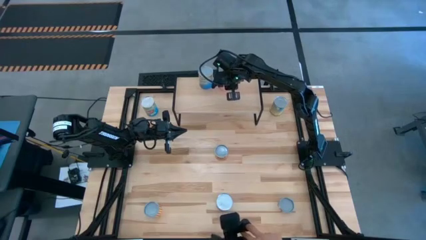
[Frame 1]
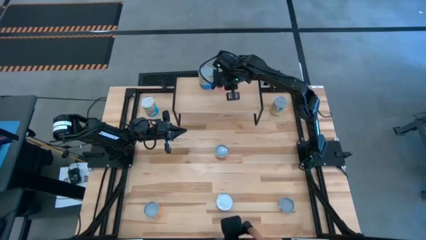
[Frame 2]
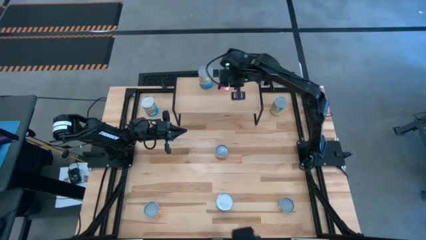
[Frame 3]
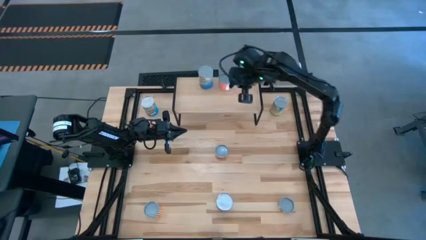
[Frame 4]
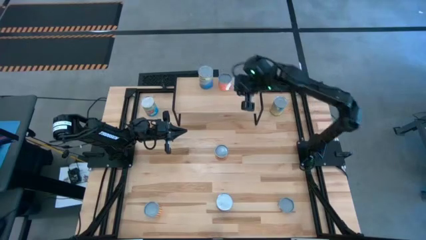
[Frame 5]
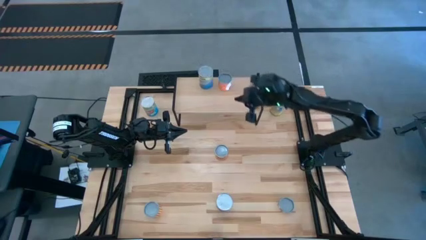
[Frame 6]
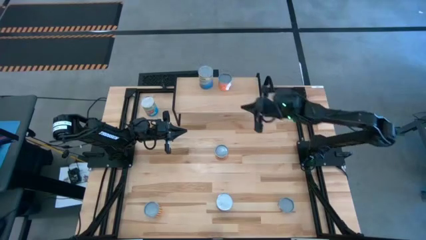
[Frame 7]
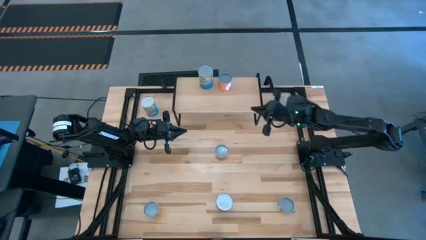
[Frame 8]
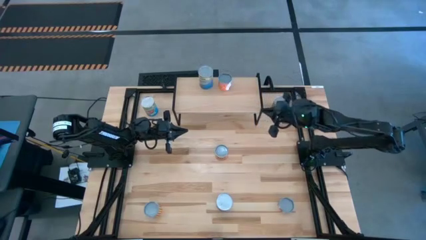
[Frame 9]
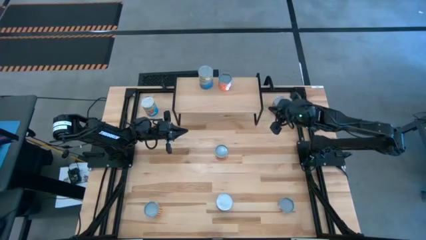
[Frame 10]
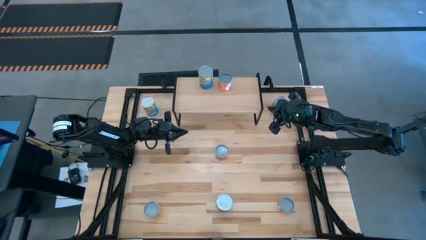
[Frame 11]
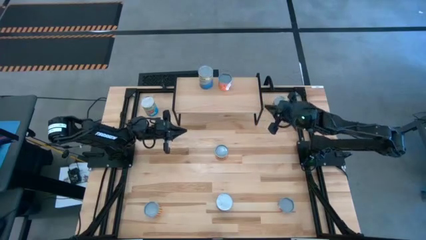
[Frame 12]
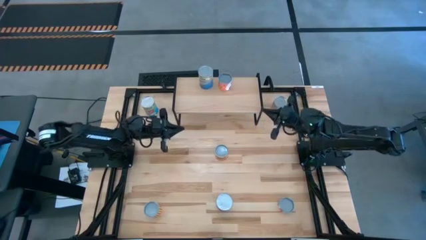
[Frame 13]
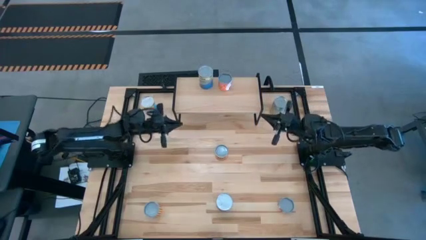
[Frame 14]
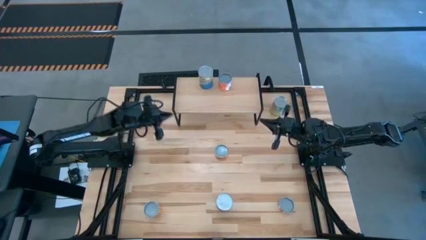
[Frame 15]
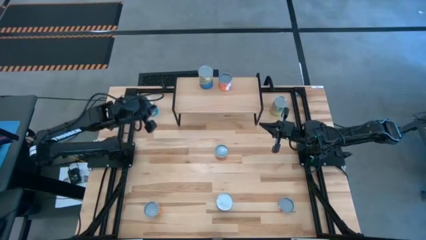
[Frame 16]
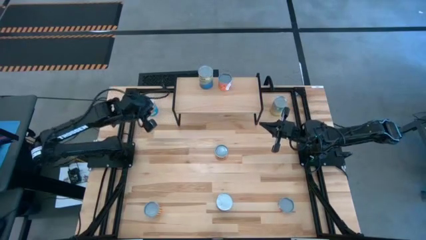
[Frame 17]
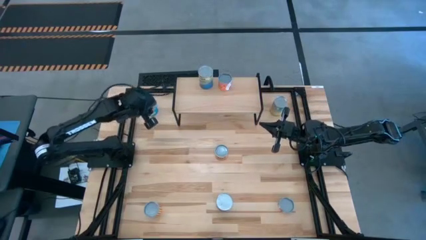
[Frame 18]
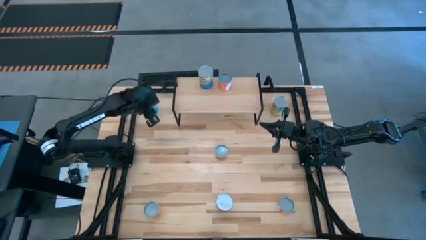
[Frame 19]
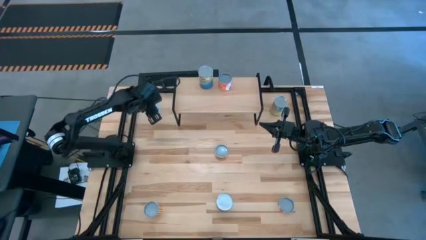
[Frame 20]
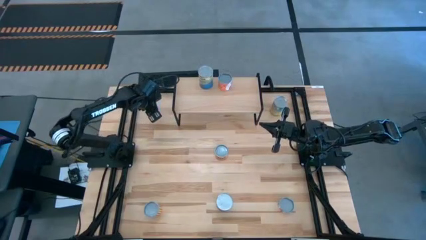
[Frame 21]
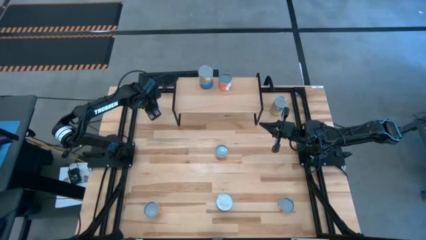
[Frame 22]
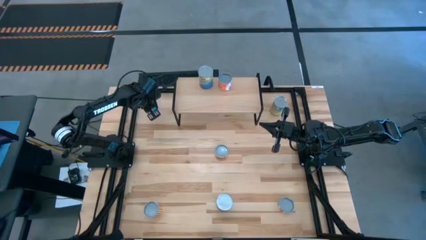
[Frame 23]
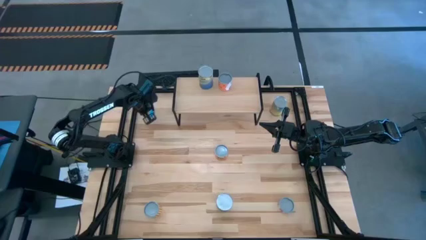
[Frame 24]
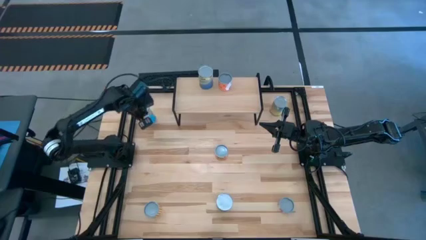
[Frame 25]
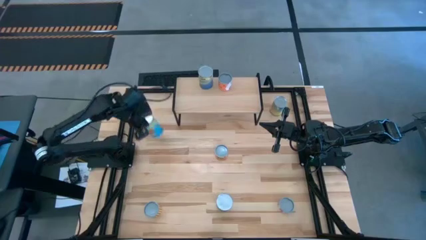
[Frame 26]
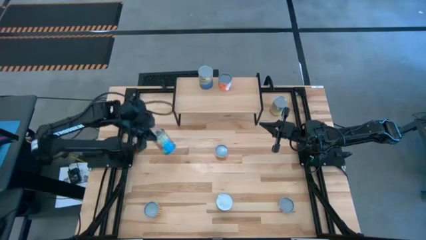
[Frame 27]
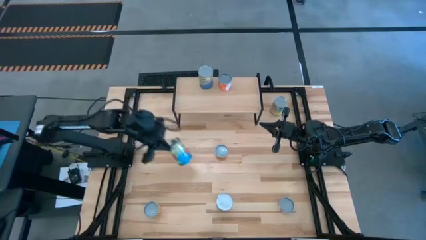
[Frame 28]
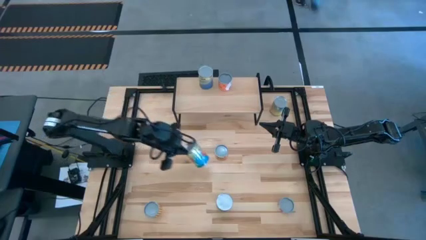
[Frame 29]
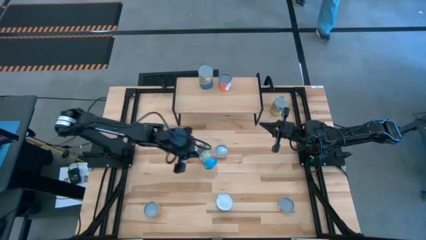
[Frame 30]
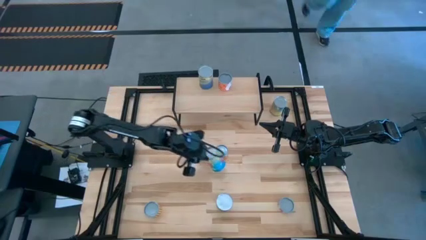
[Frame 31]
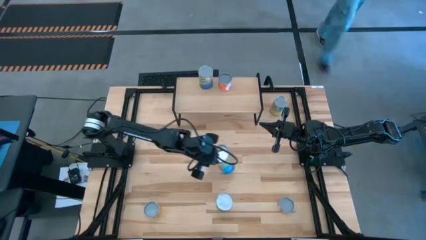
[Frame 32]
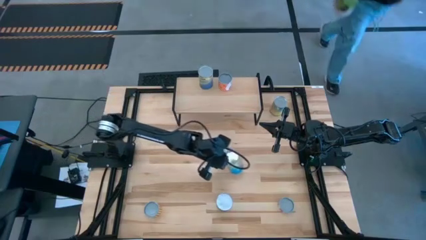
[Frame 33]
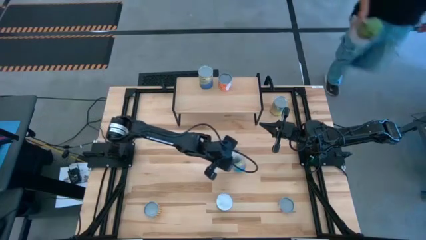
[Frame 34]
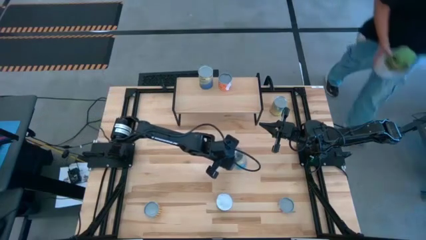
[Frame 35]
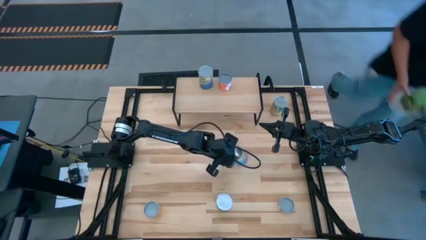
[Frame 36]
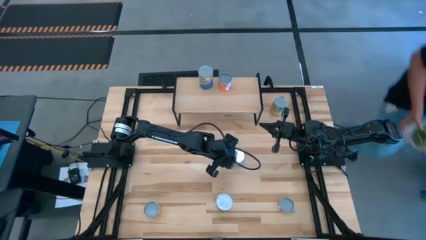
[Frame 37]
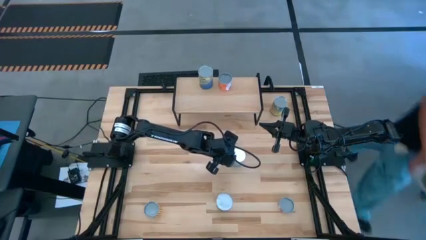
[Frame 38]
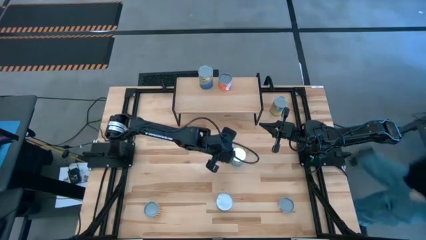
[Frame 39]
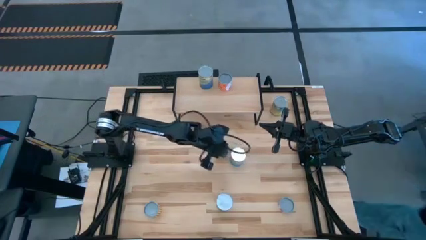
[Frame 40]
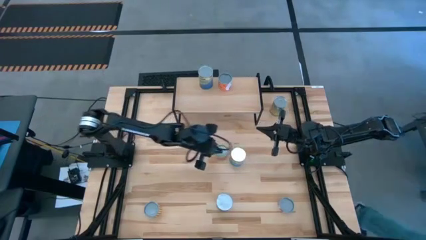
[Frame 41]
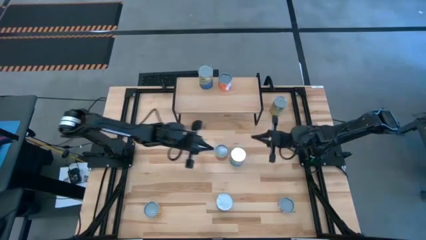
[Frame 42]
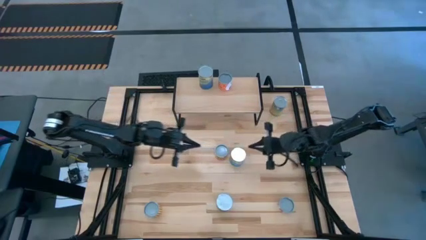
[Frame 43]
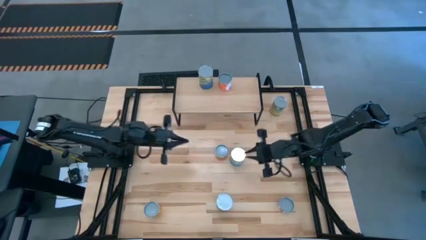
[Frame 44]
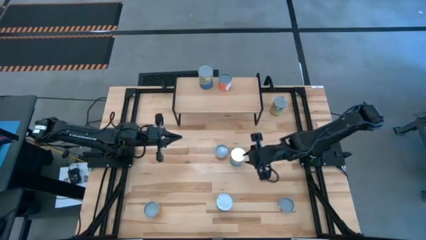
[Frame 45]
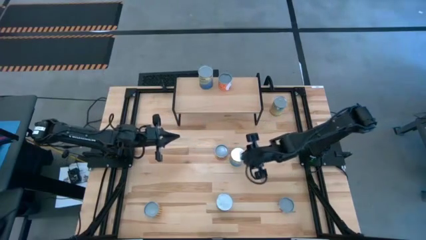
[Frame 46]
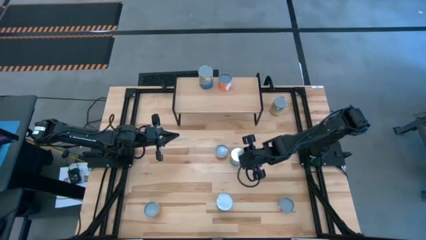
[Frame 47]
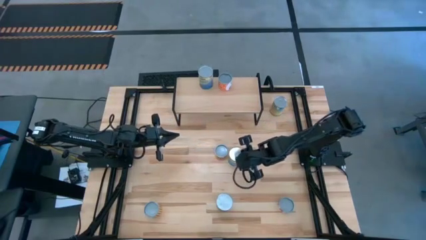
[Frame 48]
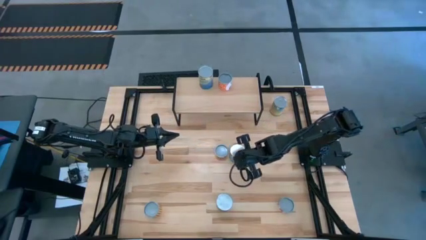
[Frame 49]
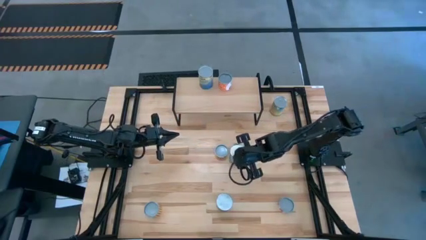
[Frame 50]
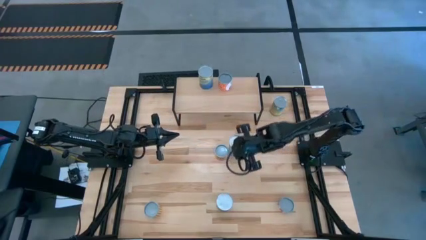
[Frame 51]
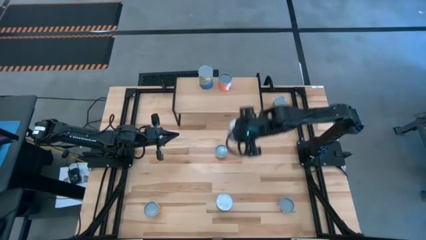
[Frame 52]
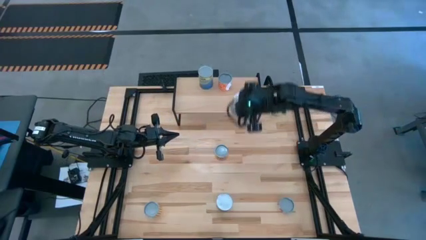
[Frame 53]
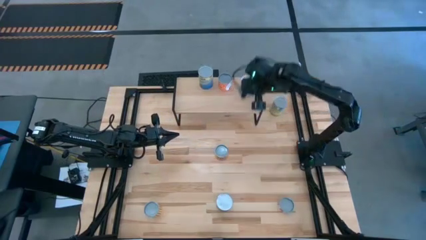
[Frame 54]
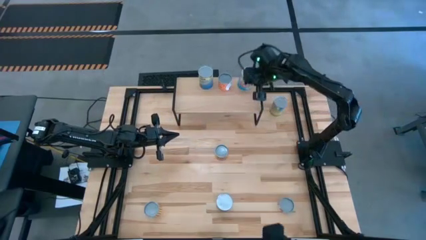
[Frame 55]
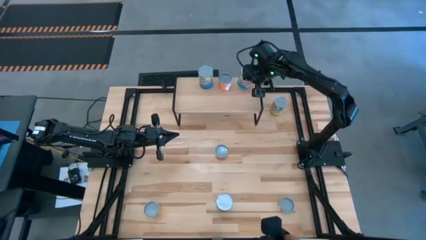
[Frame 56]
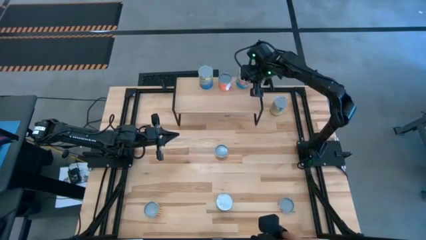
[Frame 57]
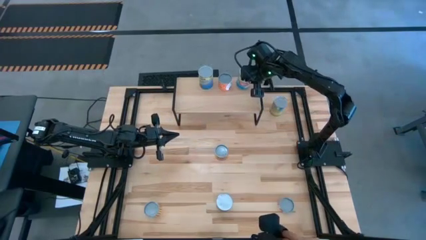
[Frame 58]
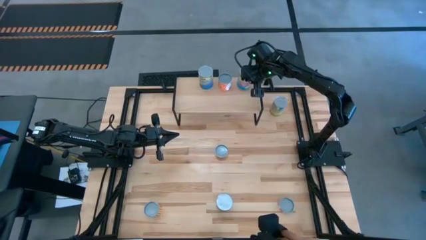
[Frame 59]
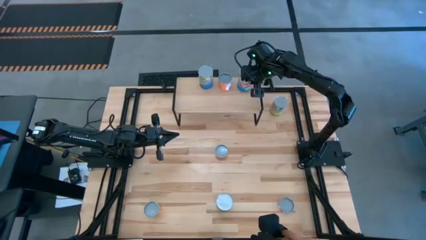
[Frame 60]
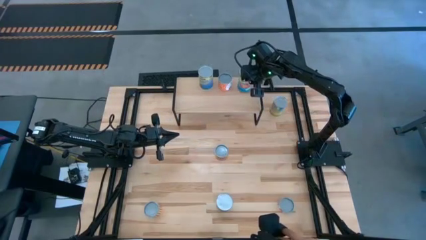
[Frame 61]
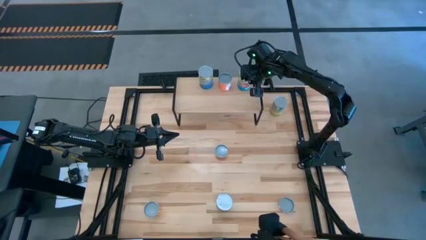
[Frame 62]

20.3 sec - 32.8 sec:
Task: Pick and place cans onto a shelf
Put the canned tomatoes on the shelf

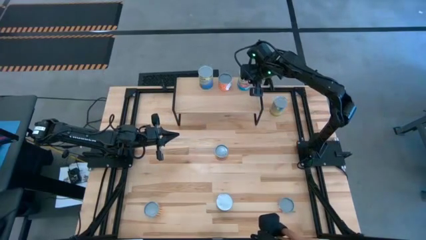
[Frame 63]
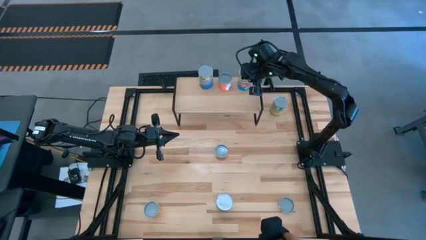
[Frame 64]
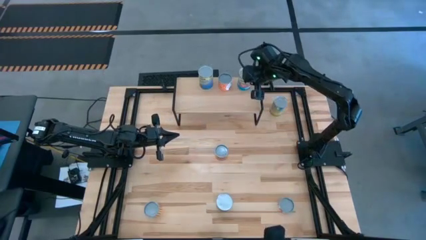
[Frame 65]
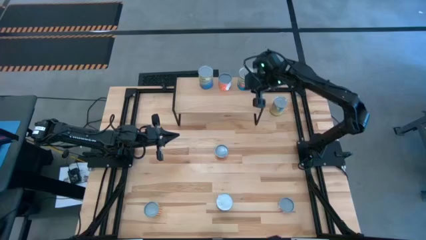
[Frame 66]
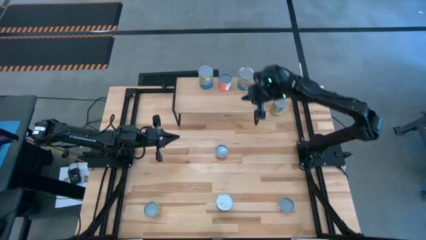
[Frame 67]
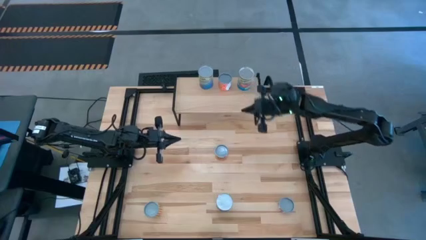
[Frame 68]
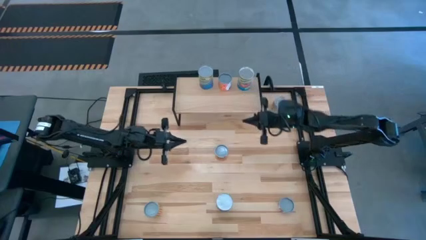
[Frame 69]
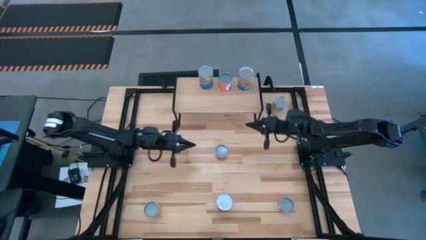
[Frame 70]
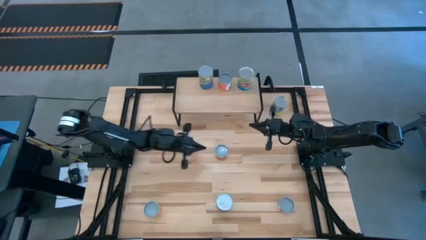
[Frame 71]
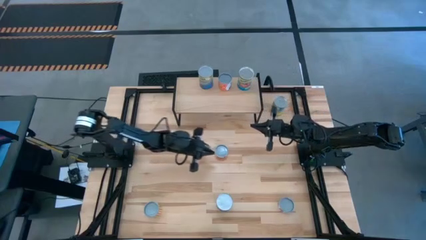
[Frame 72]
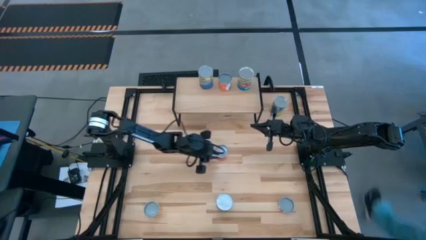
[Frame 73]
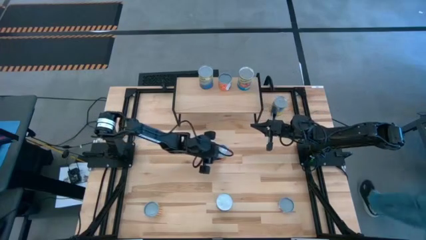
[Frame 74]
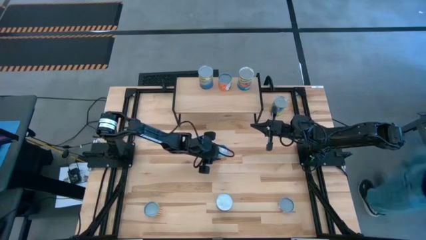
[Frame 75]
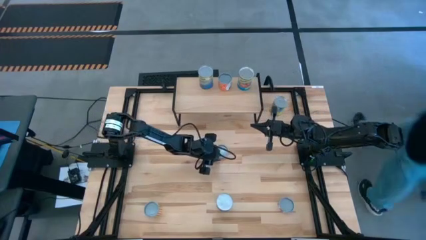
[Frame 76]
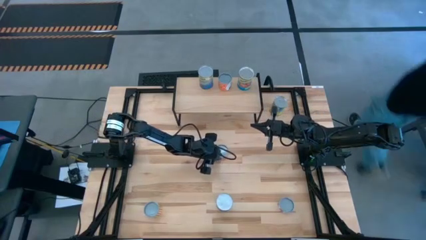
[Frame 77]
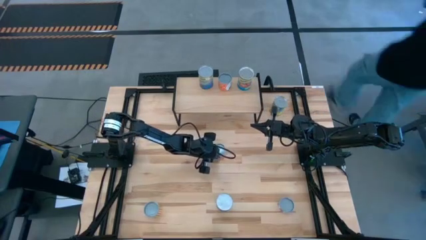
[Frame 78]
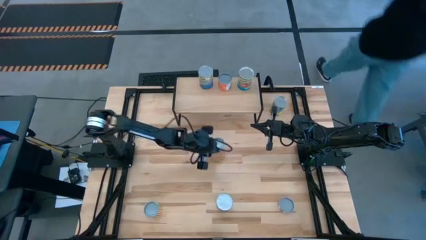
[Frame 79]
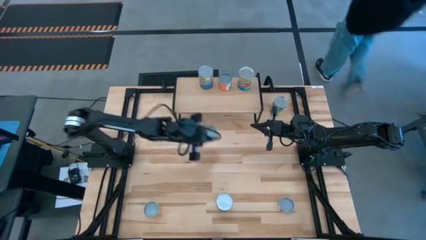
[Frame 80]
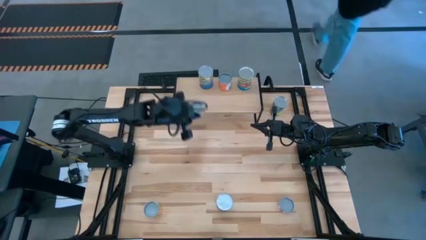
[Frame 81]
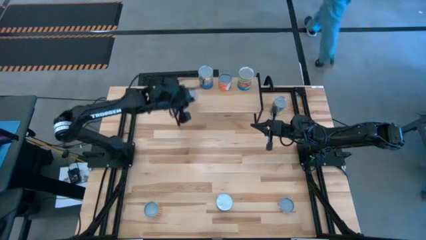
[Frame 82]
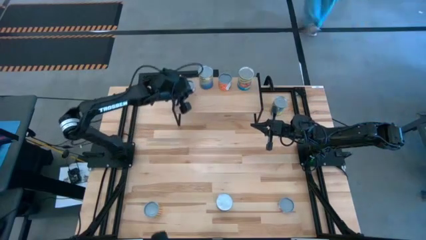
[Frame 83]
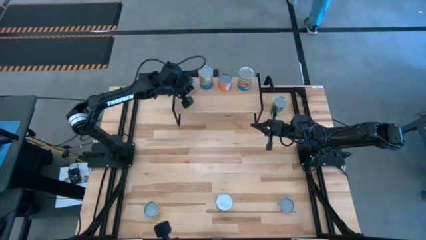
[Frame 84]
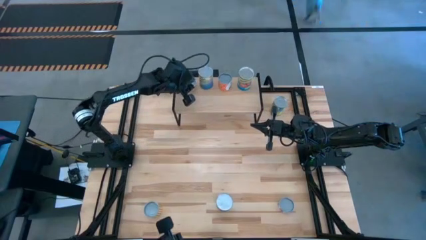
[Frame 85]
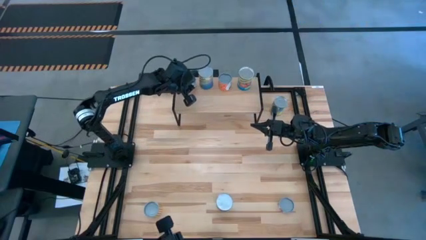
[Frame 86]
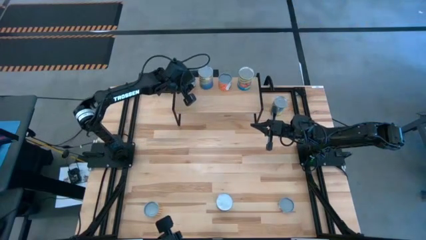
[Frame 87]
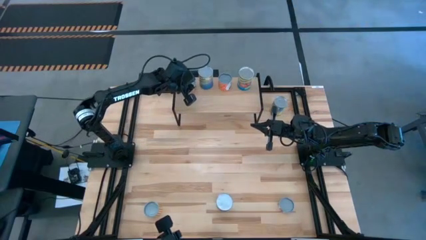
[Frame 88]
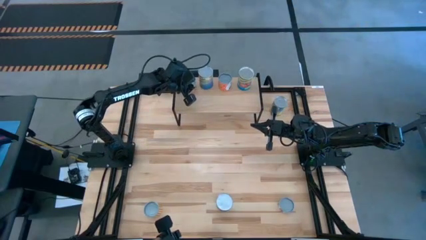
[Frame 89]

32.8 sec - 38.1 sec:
Put the canned pineapple on the shelf
